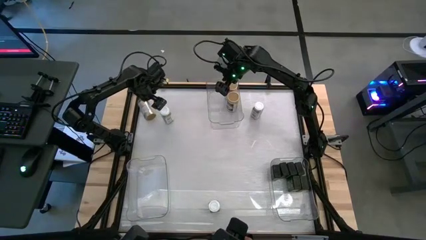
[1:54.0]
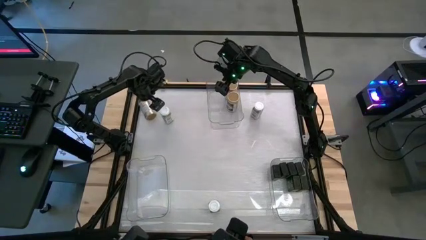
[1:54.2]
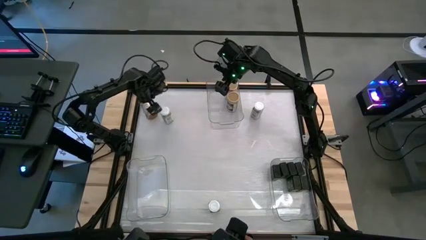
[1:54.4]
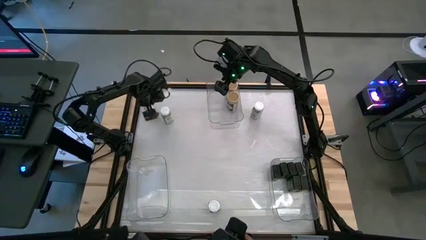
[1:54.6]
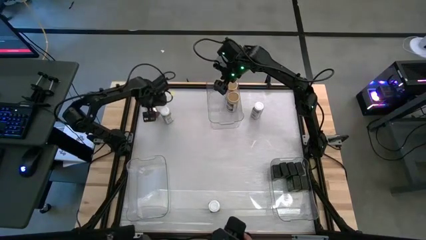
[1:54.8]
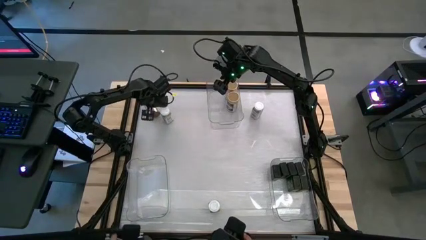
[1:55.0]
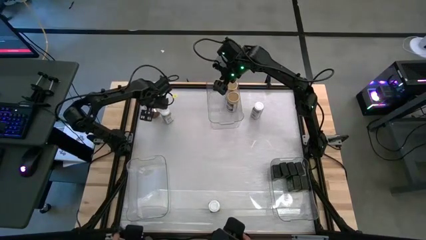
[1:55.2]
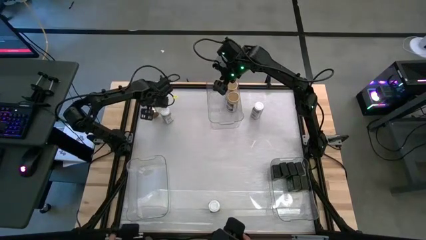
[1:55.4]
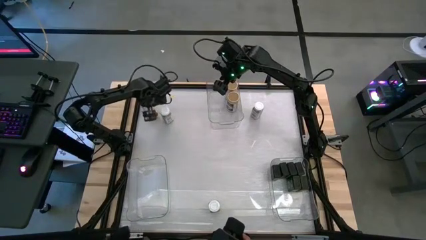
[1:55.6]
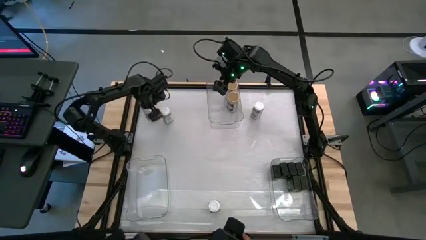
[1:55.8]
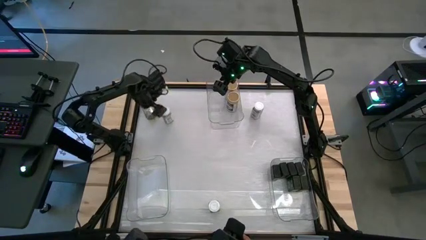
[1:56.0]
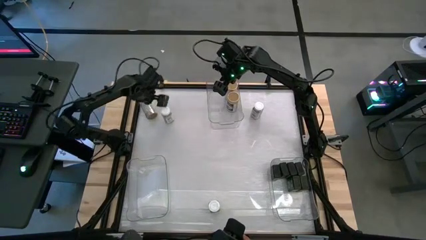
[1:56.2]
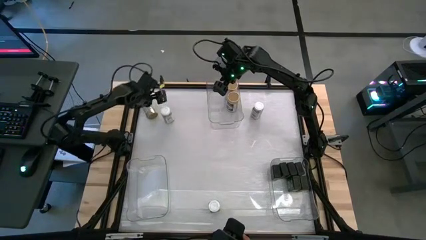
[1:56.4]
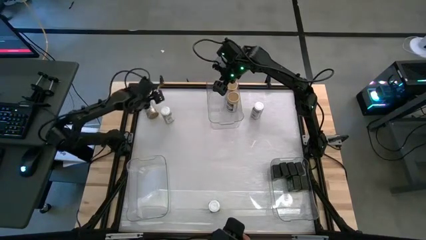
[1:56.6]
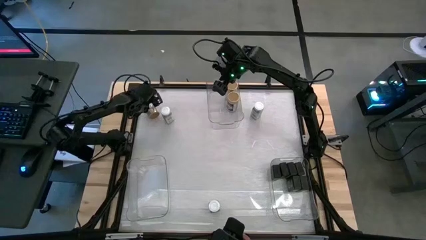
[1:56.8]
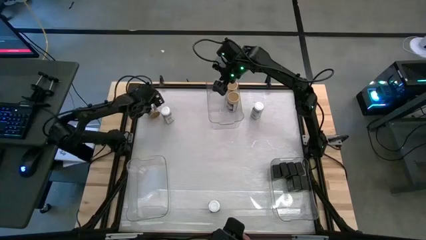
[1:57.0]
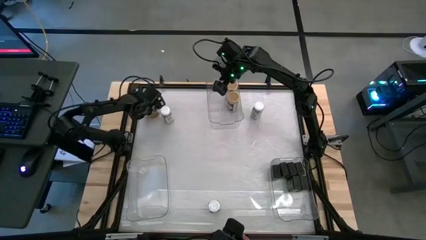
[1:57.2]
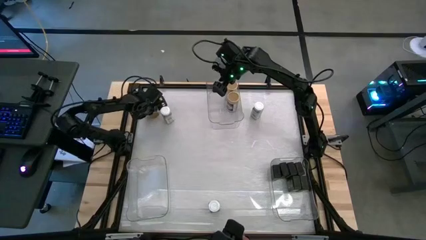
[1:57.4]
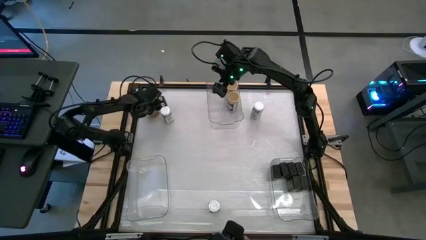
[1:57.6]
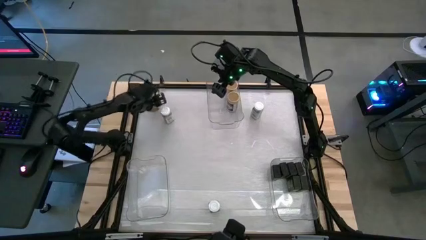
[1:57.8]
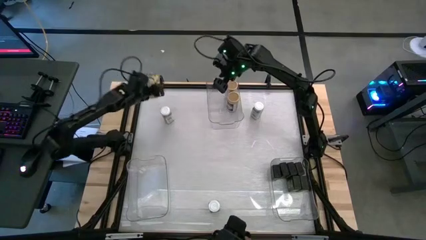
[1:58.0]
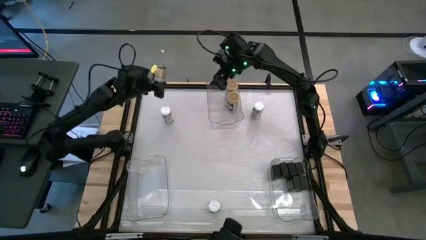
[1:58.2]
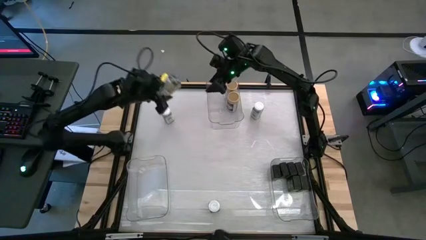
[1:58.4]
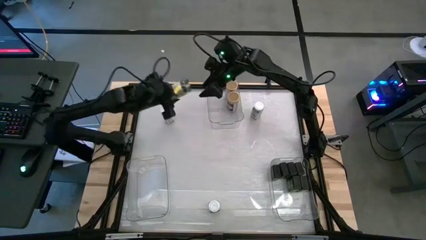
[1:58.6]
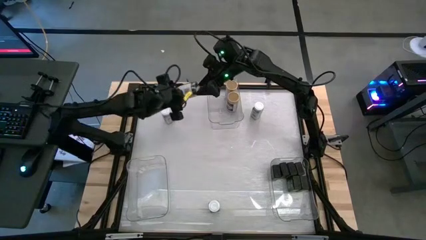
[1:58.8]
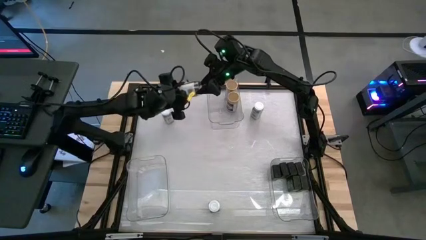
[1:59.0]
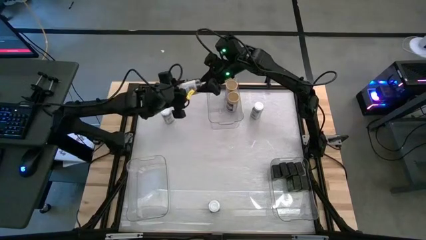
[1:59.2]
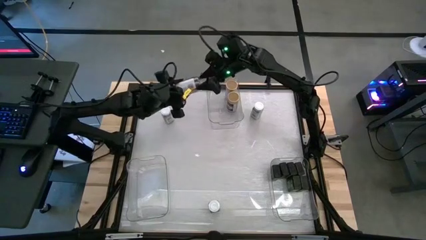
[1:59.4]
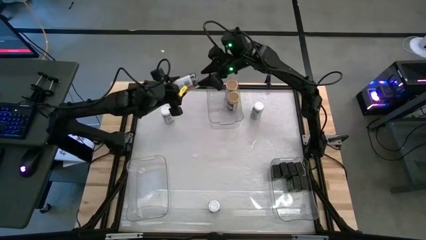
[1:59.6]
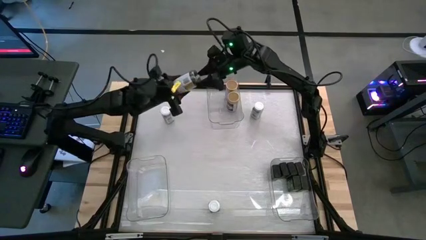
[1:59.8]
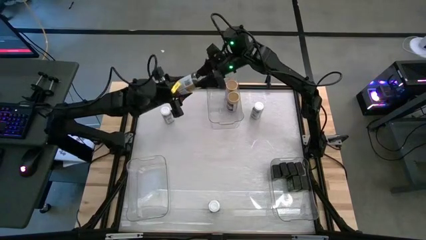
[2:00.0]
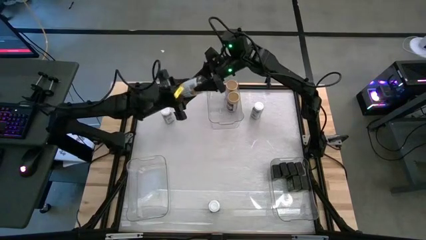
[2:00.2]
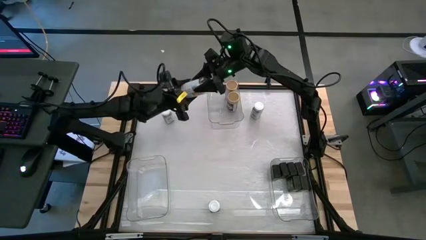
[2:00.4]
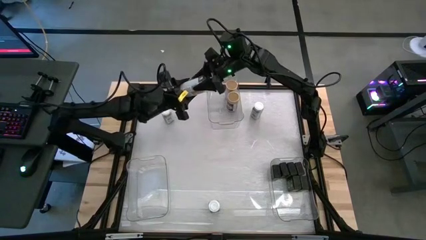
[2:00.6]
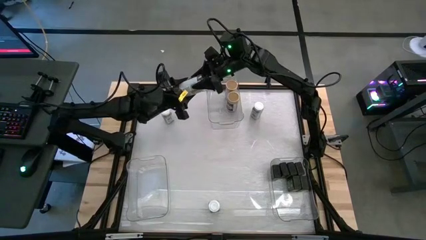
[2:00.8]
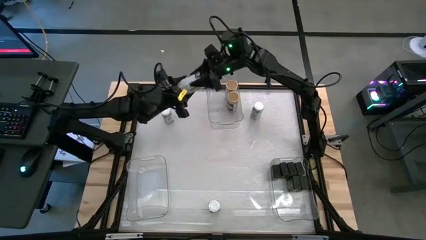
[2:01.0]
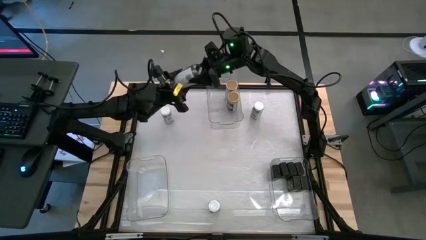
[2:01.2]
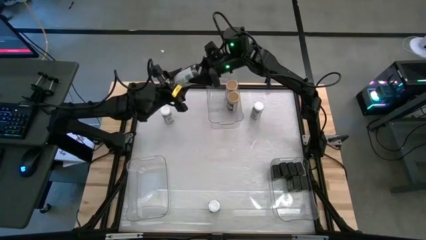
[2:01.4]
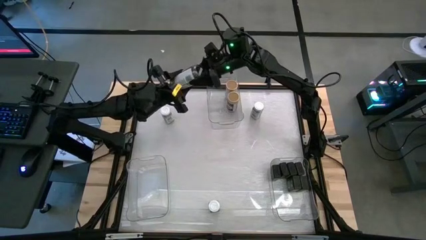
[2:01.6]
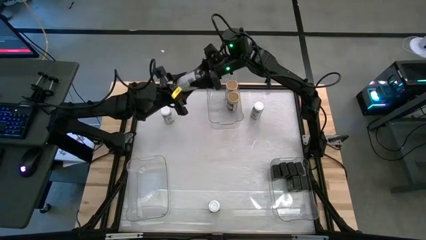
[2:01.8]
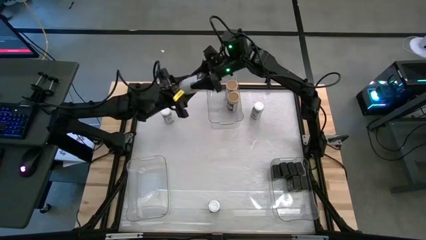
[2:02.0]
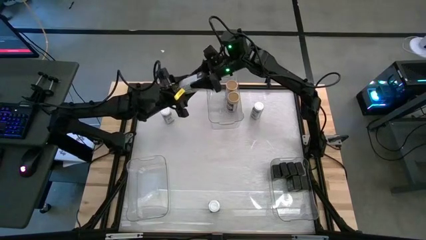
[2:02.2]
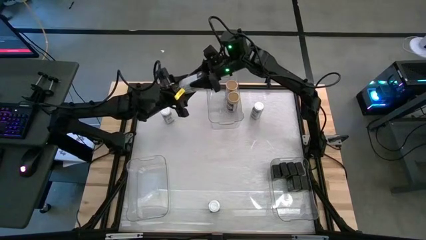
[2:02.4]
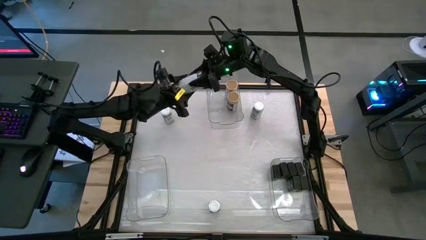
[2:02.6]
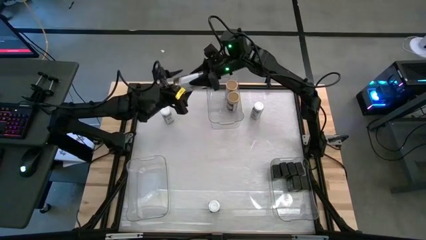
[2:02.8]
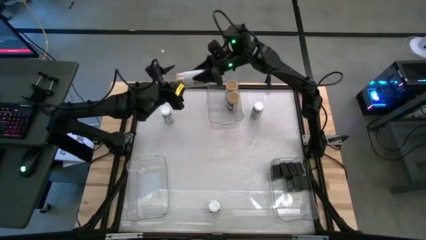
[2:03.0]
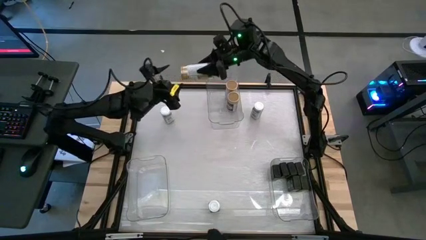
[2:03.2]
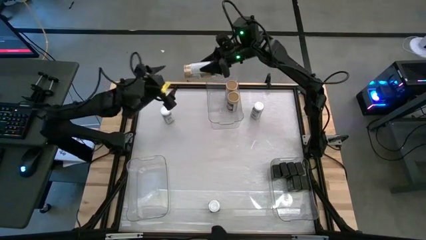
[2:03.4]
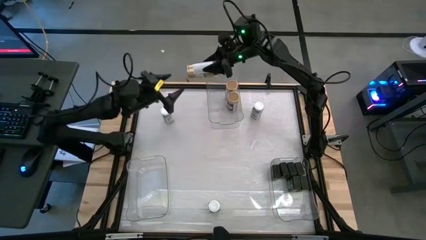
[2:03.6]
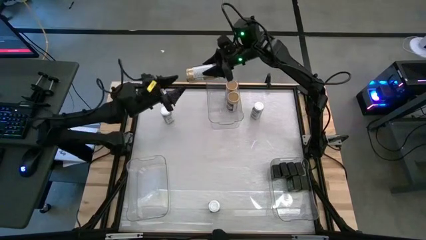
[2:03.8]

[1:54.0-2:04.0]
Task: Sort spices by type
Put the gold spice bottle into the top transparent bin

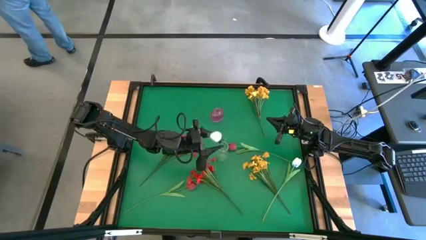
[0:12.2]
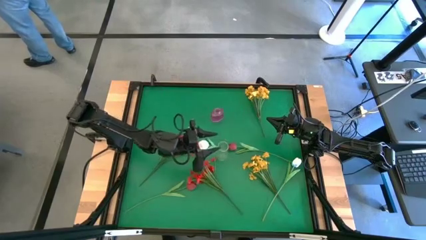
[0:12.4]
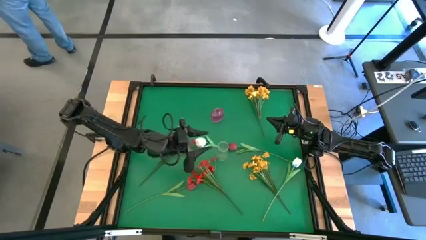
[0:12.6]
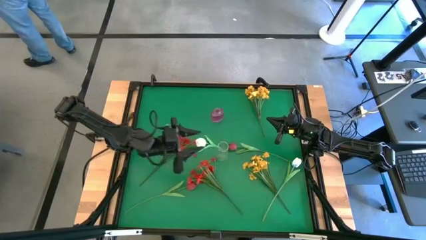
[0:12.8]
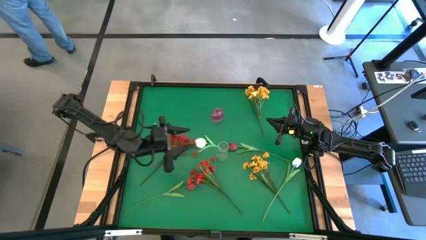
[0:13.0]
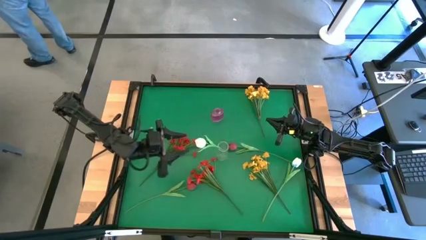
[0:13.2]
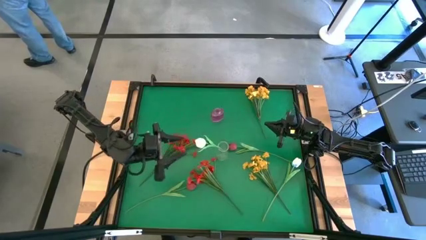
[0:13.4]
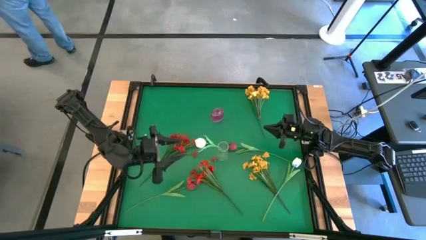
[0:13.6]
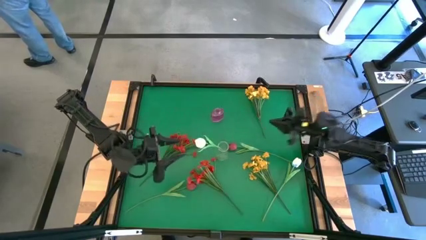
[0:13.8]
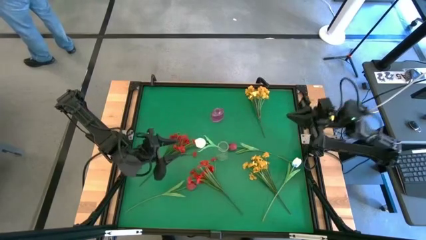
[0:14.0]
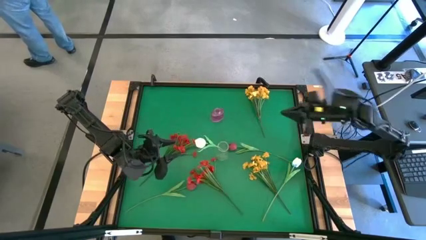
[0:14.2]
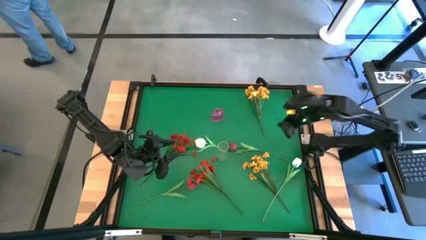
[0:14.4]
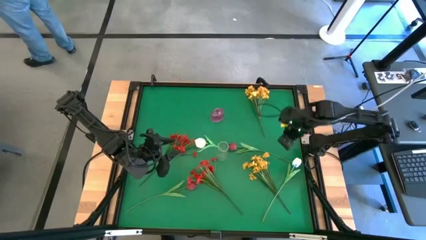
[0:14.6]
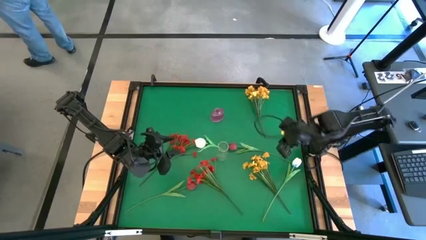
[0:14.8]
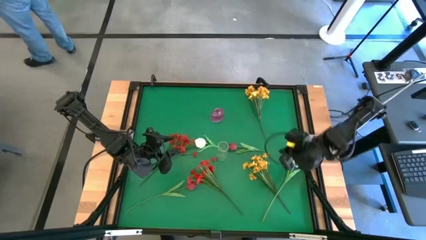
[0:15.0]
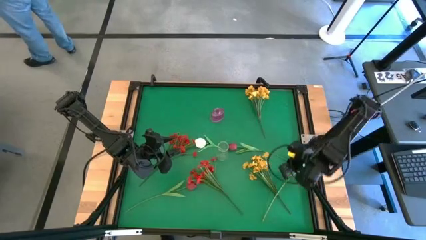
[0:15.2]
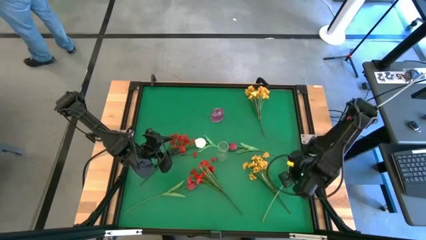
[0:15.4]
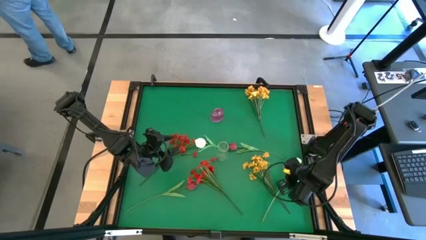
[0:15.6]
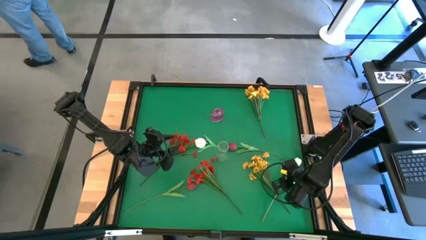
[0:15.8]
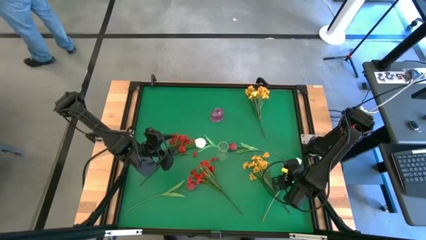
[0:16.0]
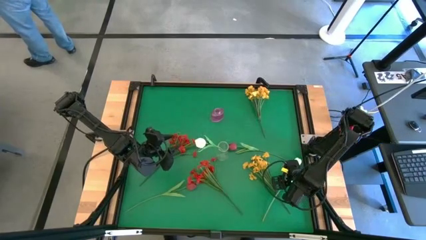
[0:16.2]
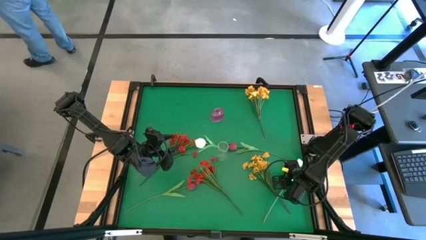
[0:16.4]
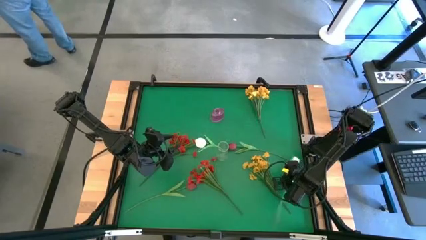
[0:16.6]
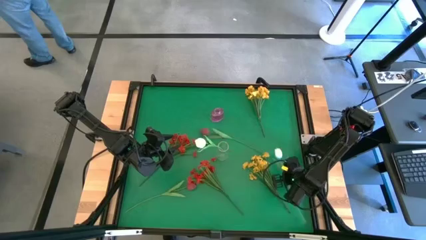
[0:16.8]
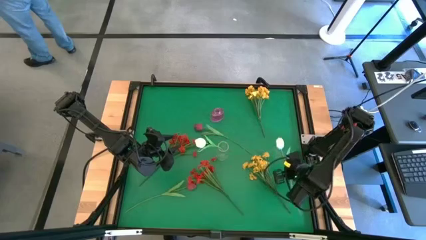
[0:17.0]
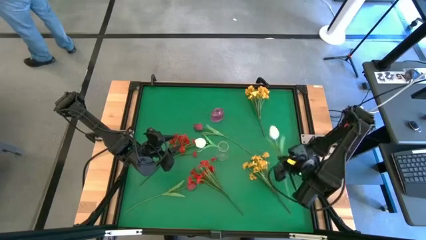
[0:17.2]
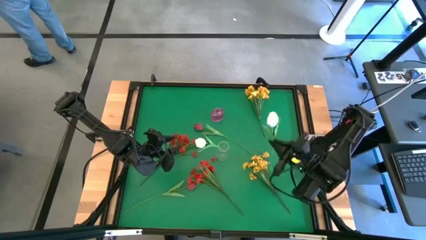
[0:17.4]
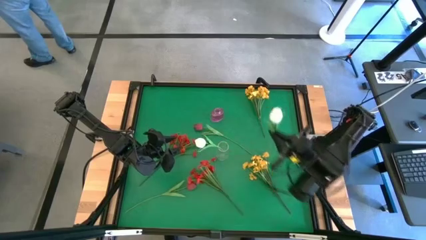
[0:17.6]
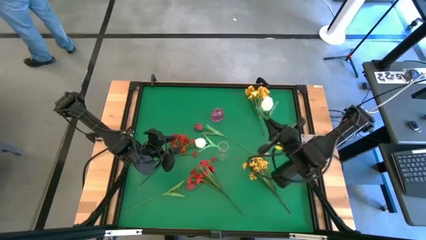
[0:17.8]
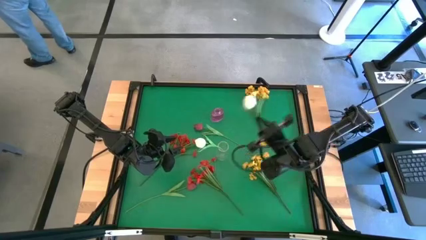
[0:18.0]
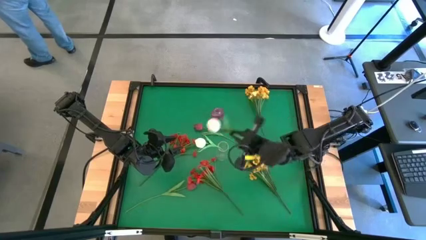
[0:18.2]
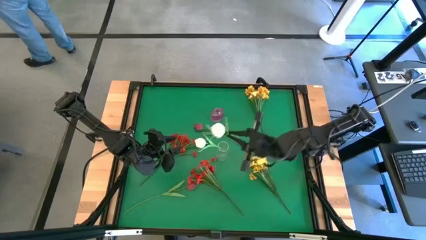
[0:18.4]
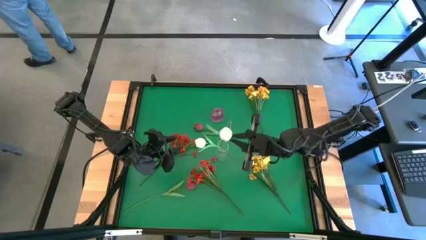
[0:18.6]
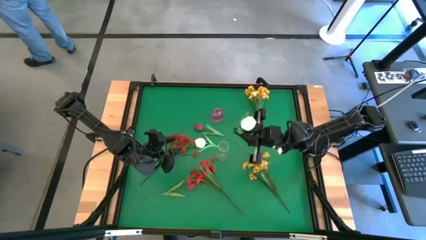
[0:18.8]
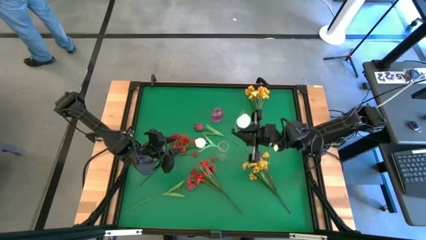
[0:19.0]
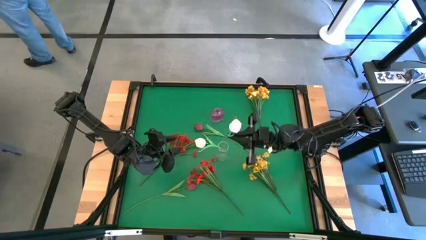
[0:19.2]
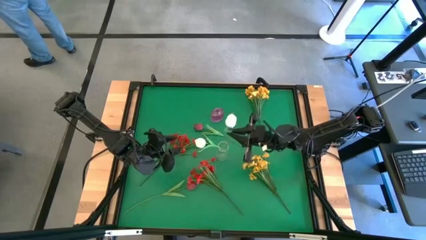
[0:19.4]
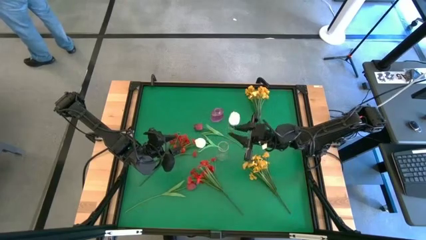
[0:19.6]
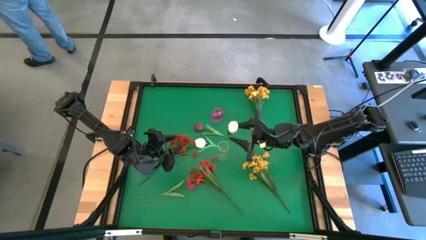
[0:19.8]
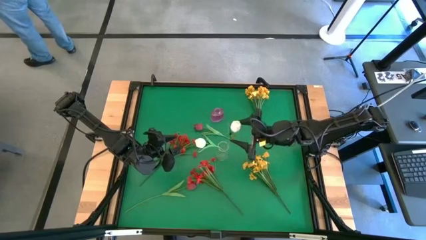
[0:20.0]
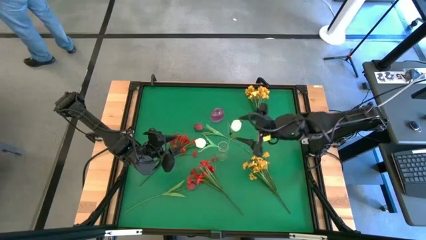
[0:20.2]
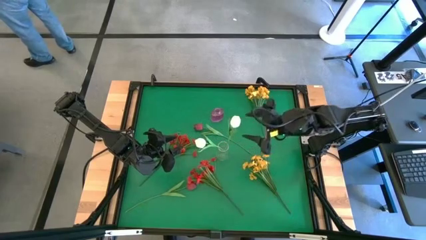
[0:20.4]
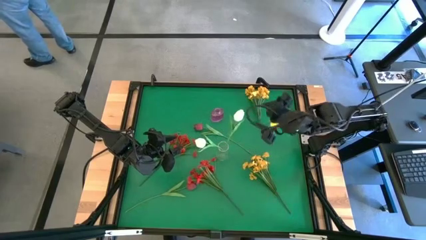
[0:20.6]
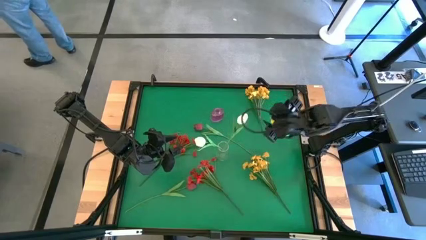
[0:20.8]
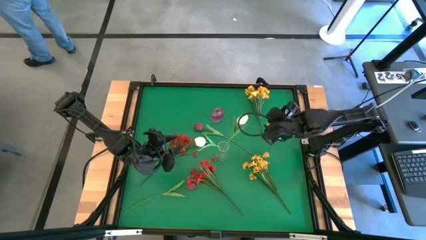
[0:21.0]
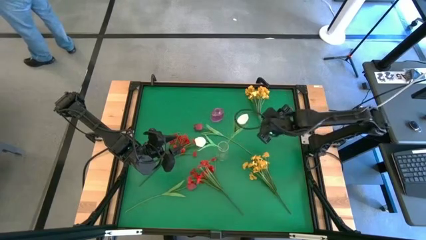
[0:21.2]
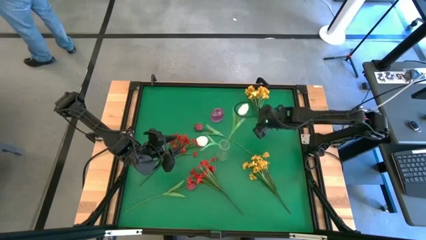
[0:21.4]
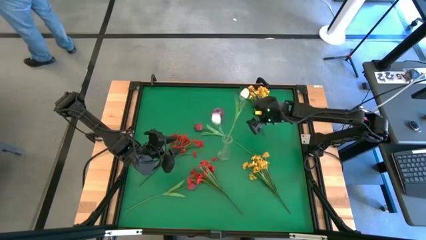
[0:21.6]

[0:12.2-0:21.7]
Task: Sort flowers into vase by color
Put the white tulip into the transparent vase
